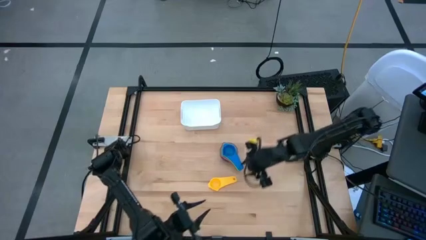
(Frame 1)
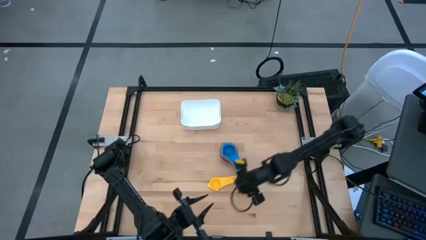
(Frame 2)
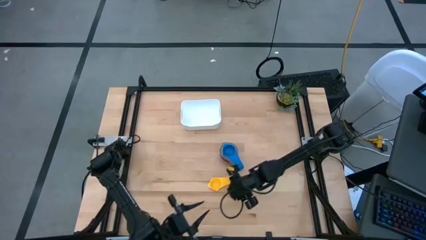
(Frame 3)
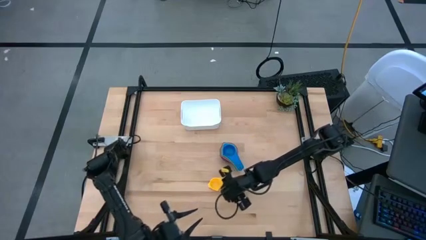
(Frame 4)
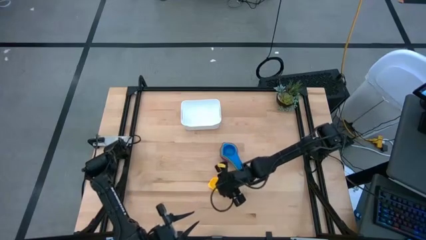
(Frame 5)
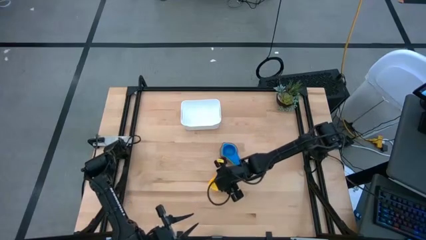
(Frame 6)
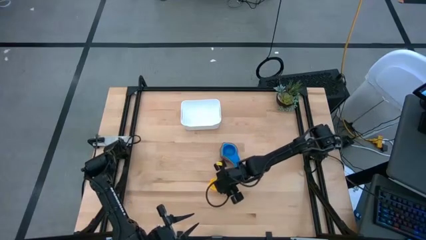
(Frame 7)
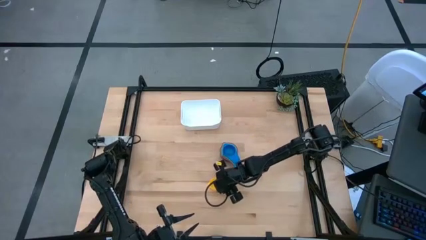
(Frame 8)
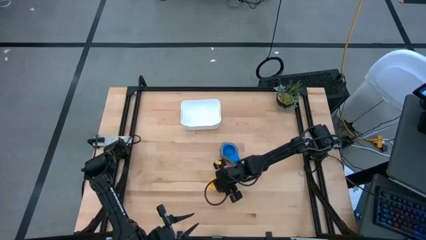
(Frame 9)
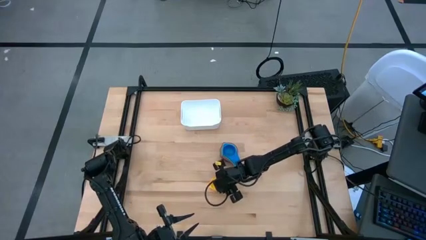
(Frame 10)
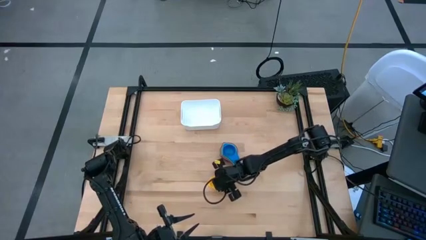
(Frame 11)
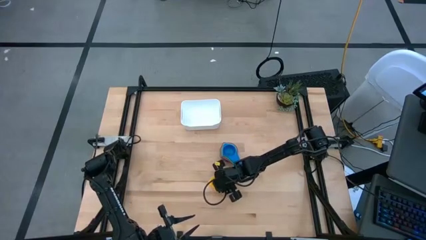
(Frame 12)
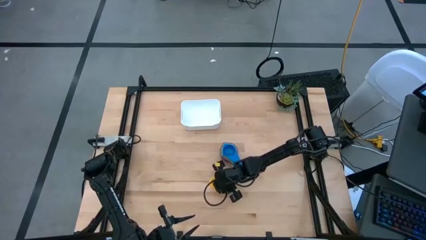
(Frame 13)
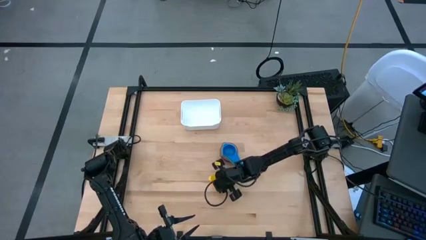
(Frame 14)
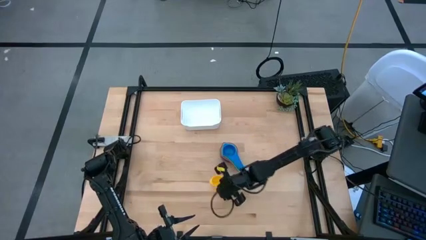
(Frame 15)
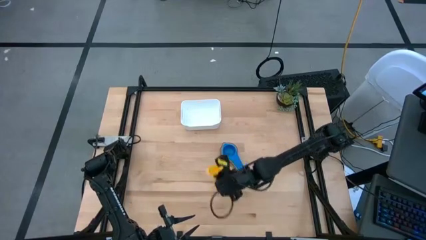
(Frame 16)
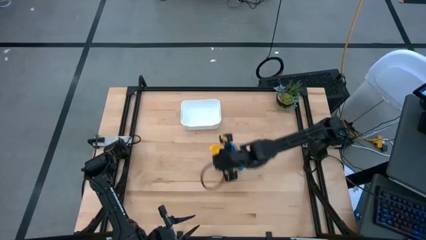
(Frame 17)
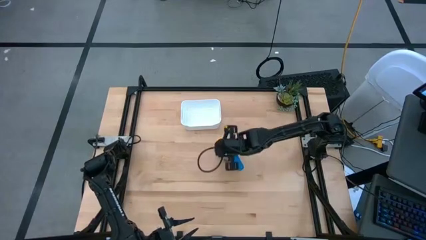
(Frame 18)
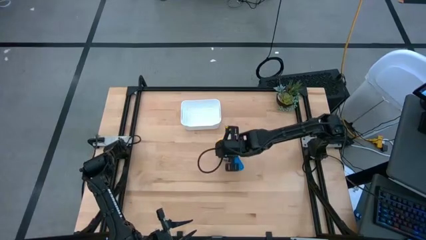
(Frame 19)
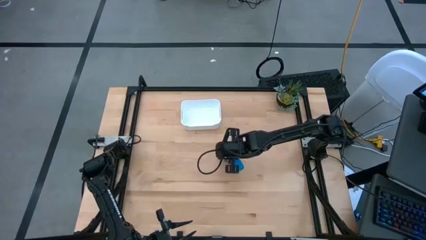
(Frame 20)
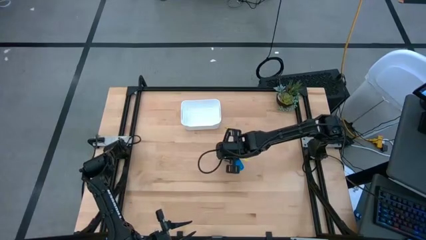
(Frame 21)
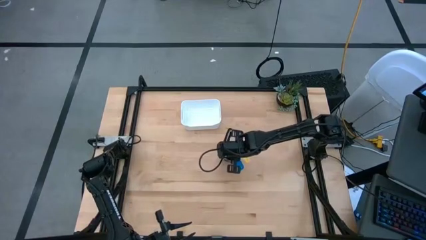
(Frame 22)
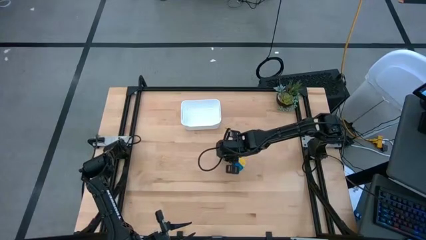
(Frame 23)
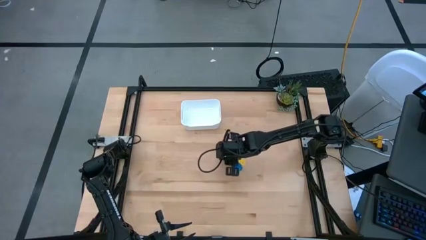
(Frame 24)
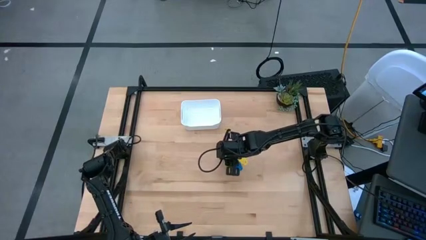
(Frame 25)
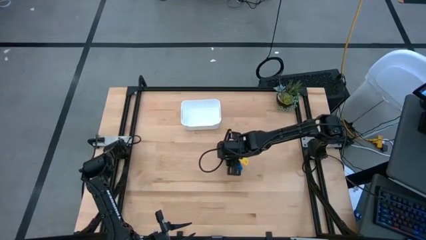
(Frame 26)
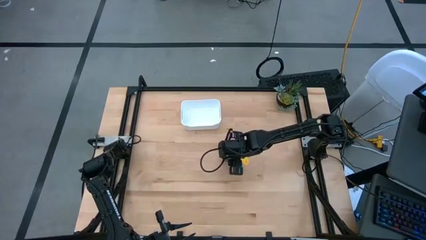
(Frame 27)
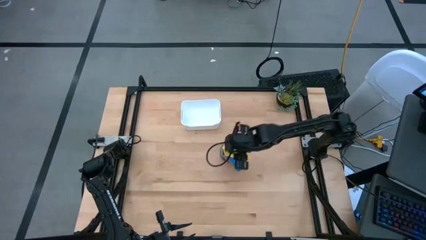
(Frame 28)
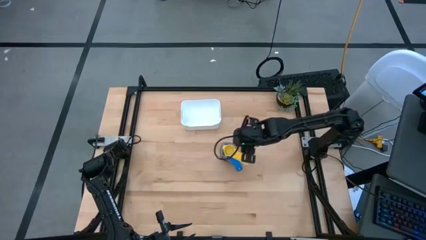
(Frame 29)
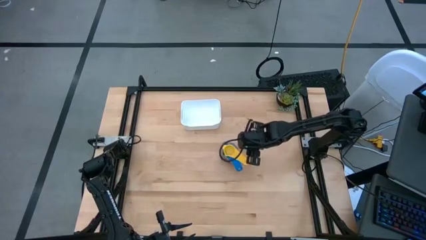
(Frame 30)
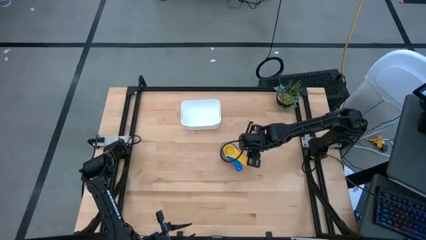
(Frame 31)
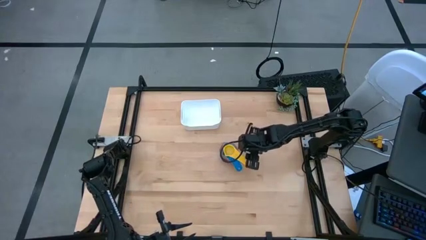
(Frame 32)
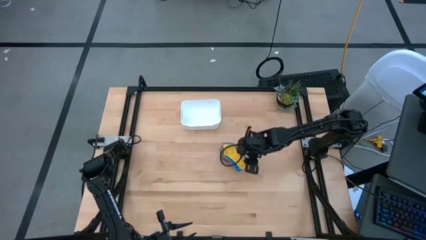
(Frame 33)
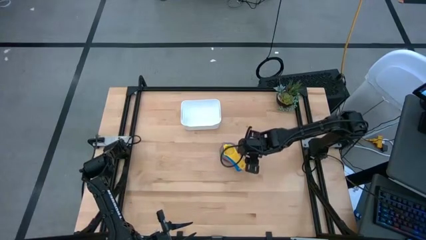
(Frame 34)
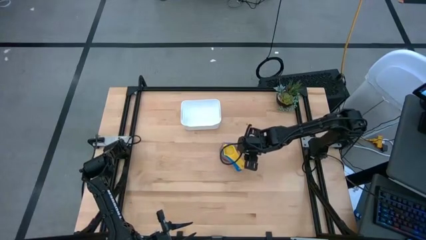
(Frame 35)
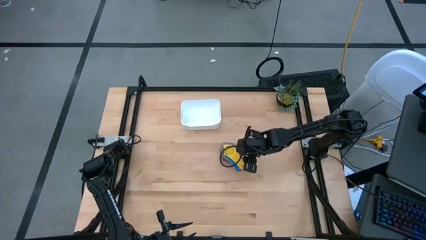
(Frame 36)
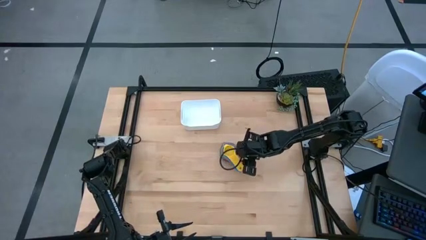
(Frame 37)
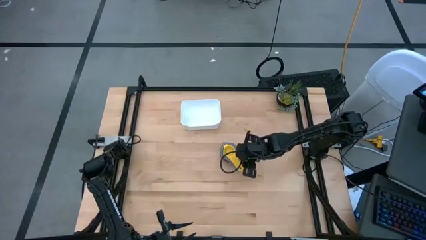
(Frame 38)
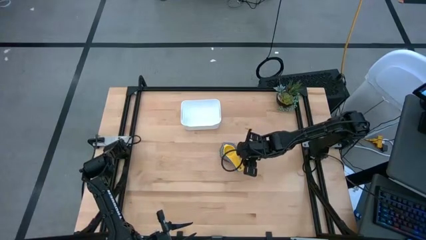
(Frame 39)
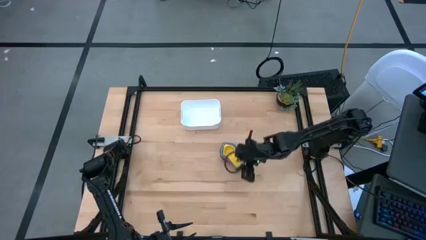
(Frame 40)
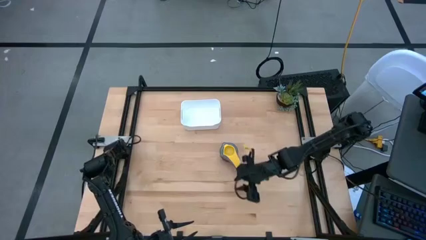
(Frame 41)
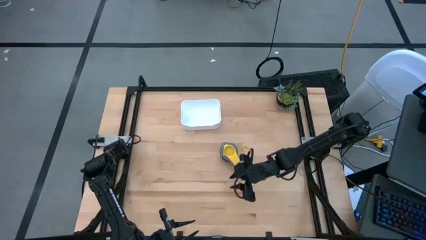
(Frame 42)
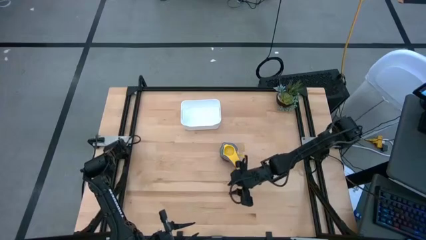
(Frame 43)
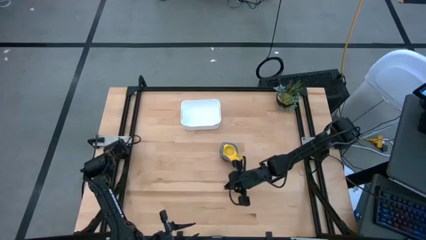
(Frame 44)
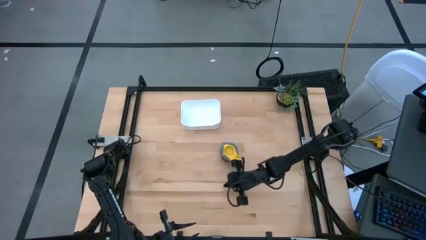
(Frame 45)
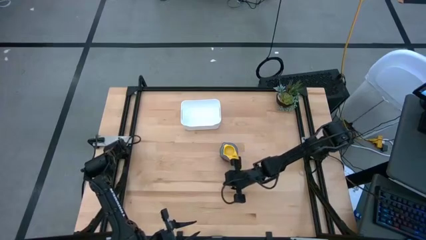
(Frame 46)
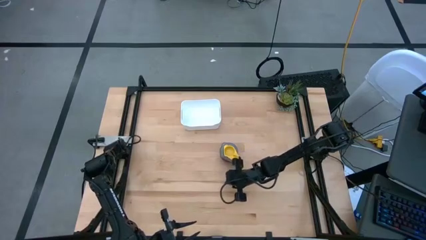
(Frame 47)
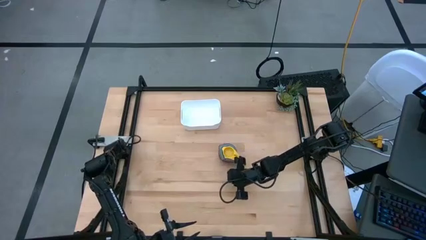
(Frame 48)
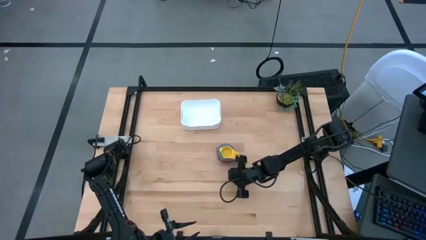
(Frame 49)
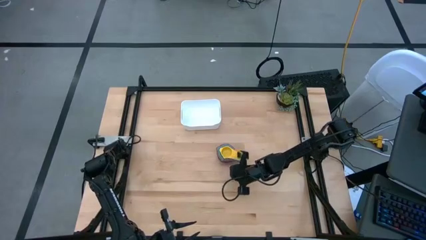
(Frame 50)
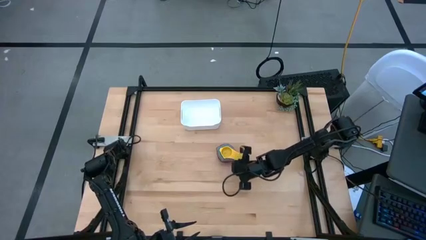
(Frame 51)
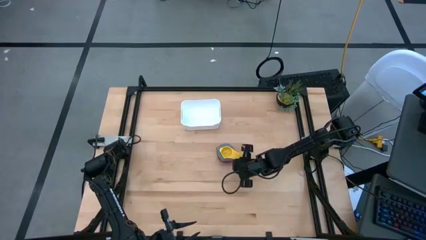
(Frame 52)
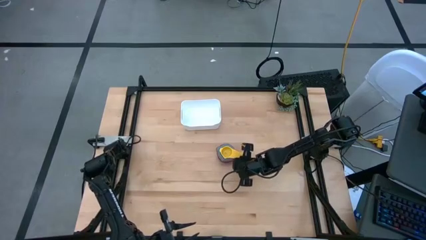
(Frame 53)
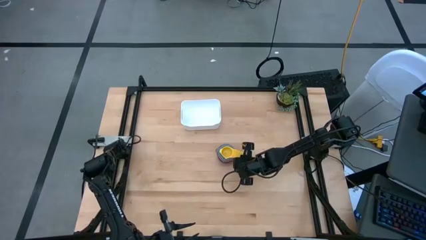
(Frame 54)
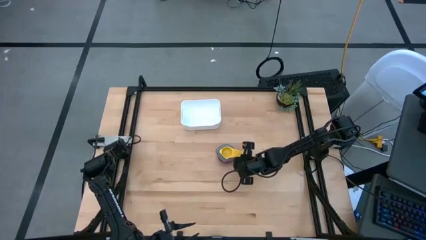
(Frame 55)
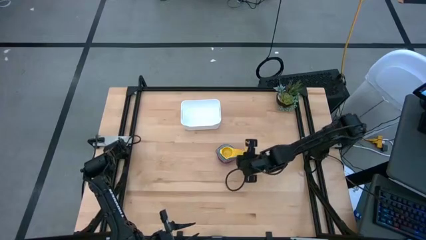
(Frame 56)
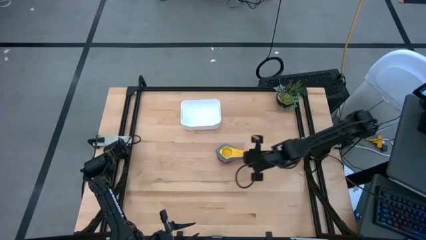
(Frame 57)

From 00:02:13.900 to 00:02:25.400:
Task: Nest measuring cups in basket
Stack the yellow measuring cup on top of the stacked measuring cups
